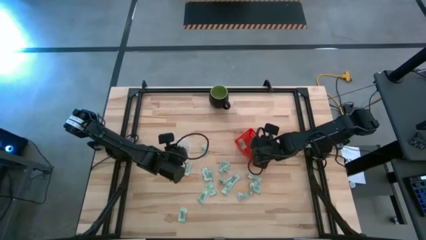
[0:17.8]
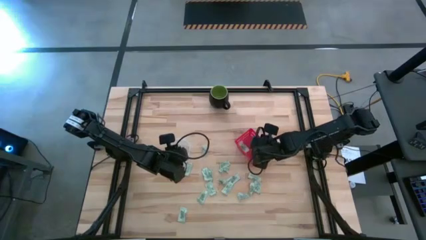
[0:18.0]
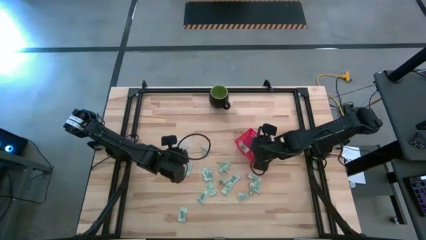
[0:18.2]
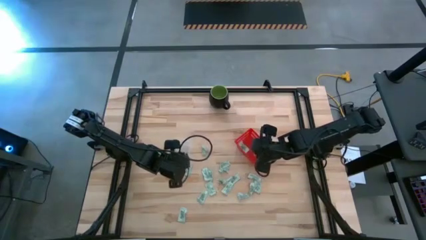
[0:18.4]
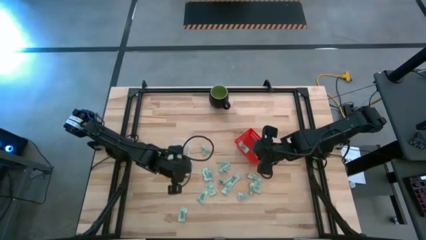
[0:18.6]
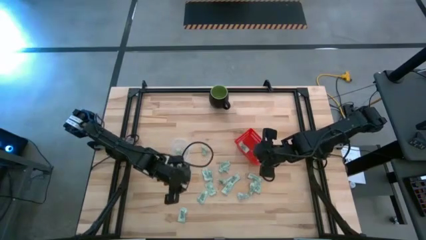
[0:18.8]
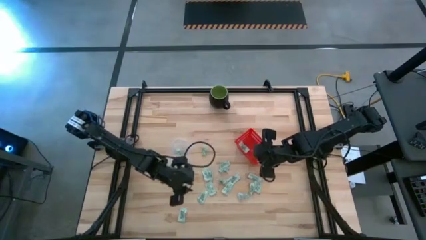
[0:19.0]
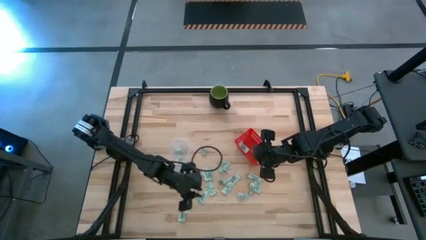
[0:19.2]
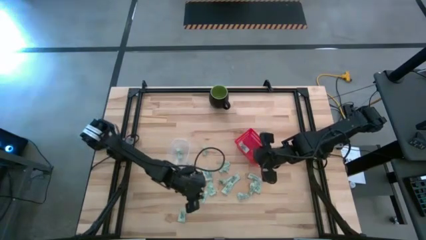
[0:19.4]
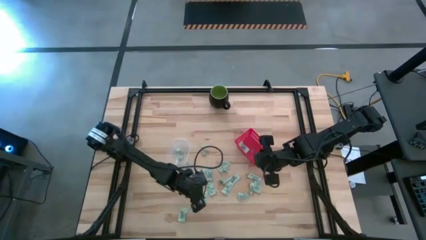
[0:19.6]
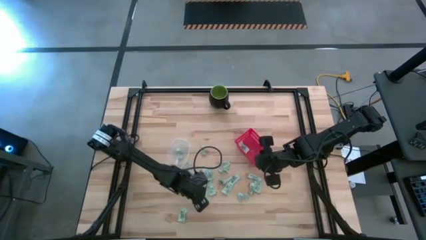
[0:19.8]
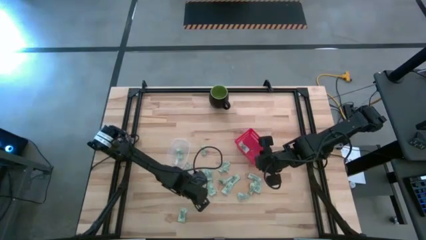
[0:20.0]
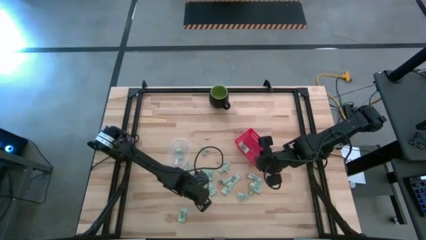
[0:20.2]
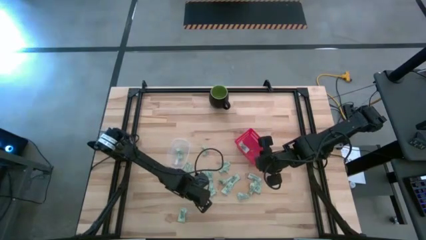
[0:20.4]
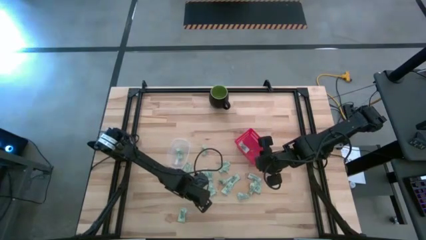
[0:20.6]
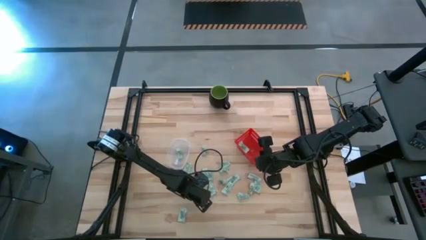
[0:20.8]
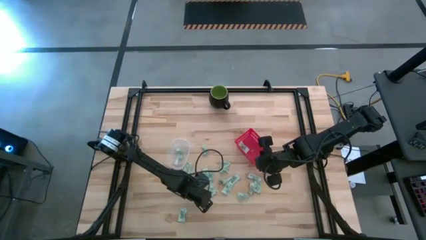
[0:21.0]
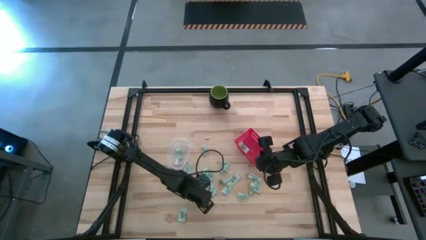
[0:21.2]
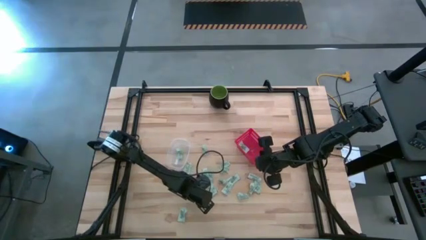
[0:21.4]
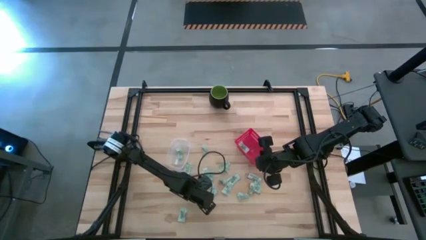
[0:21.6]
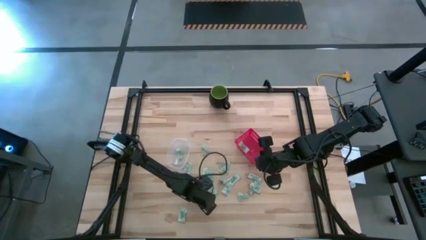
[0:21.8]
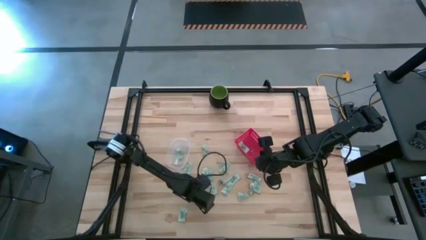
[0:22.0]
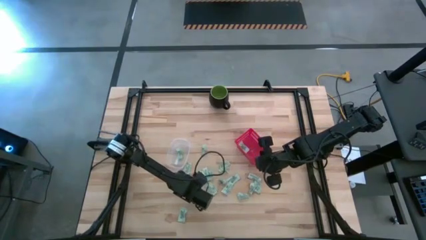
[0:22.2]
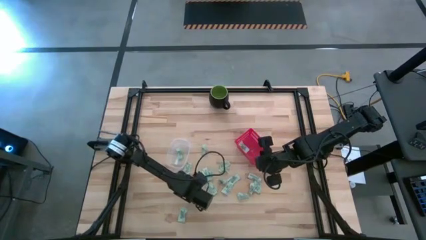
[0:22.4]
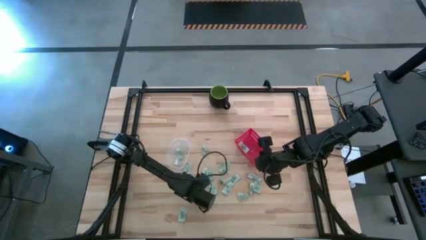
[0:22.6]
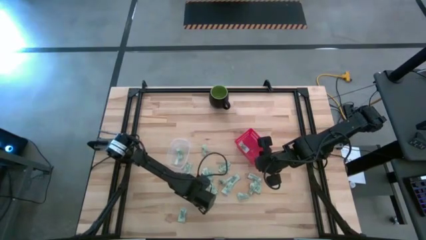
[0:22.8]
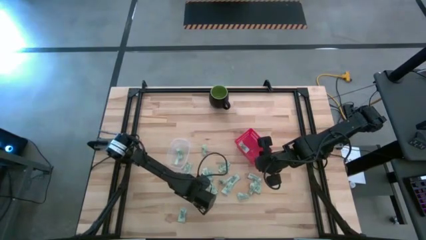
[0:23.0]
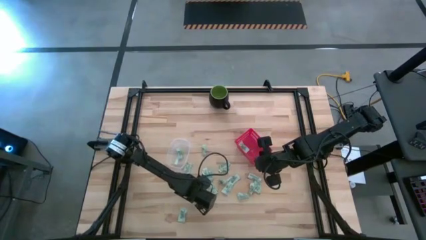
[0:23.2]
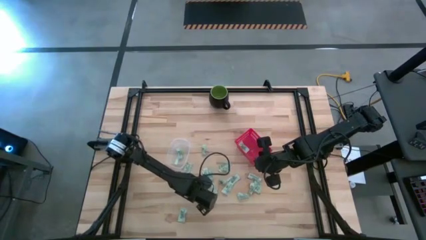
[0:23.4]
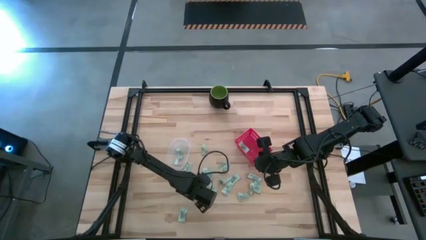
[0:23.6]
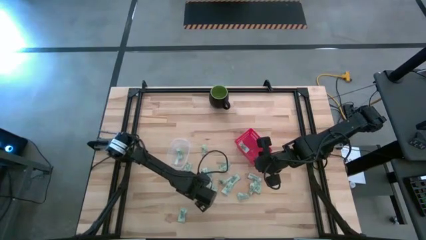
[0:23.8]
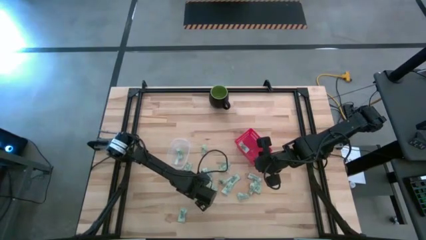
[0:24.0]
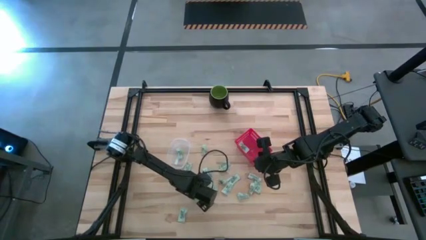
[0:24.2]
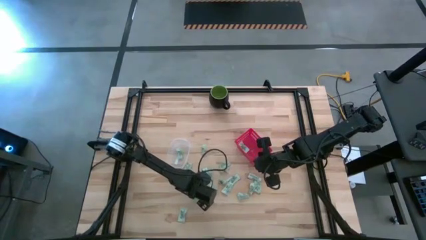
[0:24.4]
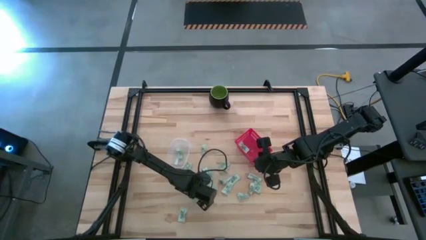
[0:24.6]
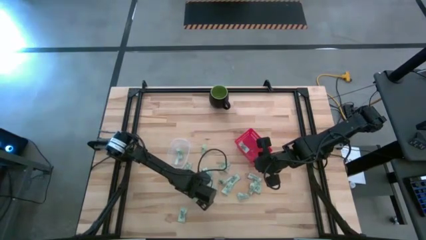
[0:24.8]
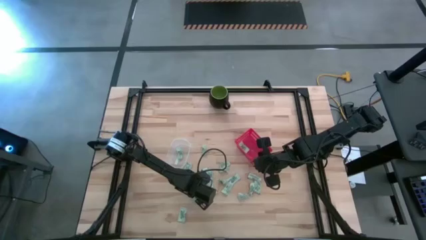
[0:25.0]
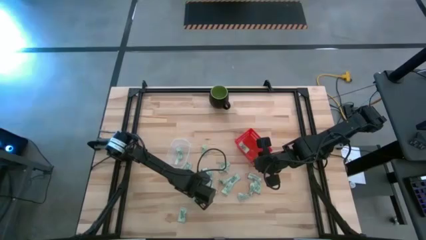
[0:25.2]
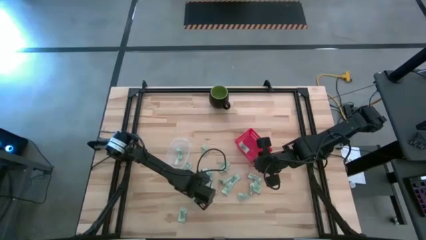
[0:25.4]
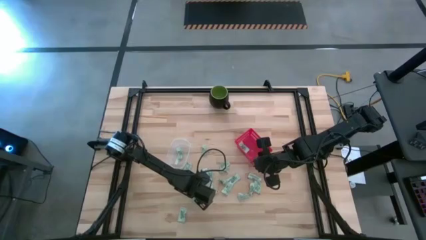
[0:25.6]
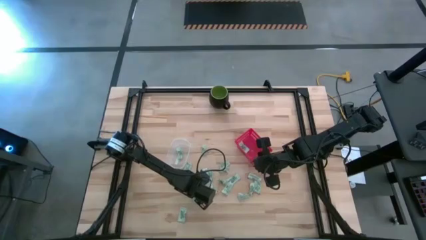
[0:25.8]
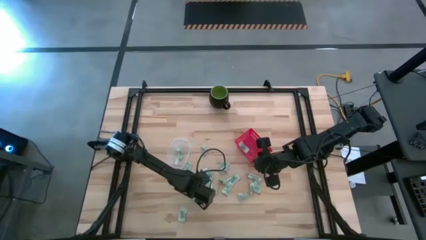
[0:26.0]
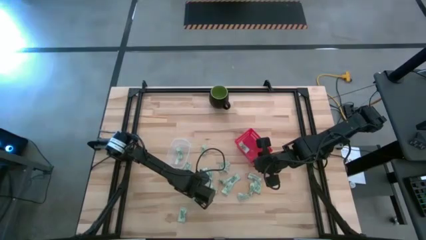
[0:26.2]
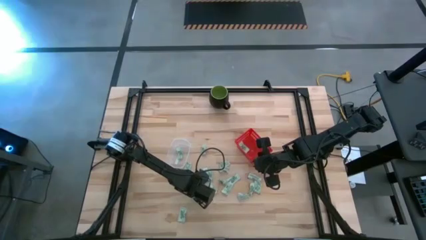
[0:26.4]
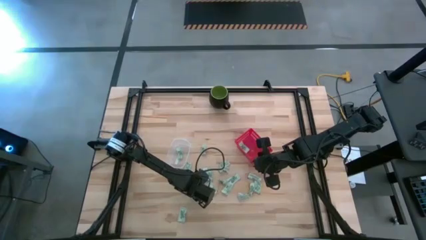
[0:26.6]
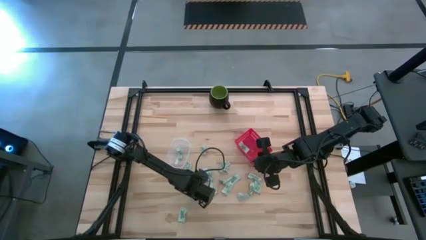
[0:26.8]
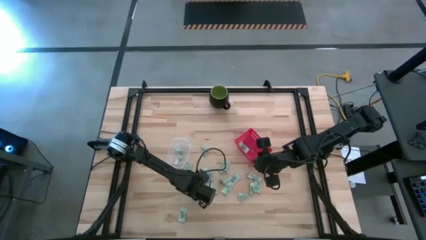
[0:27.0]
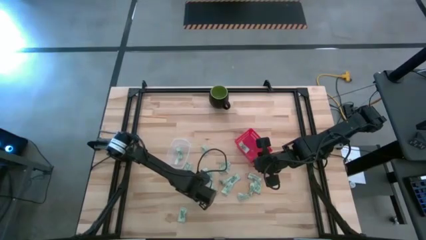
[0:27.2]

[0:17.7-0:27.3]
Task: Pick and place items into bin
Put the stevia packet into the transparent bin

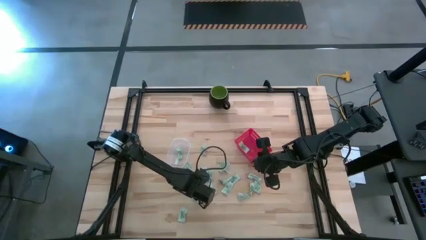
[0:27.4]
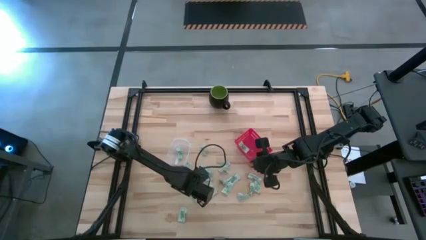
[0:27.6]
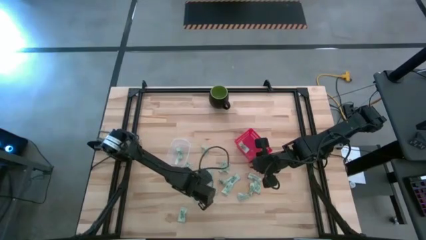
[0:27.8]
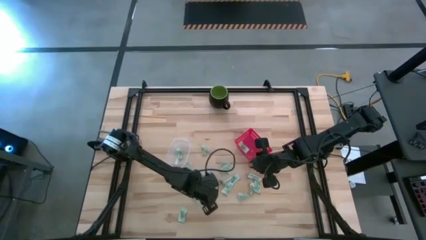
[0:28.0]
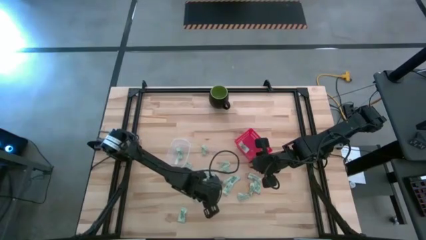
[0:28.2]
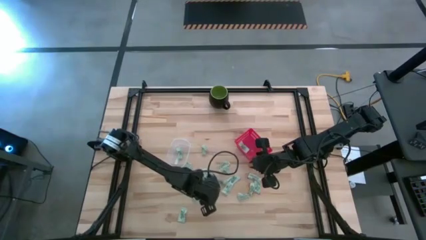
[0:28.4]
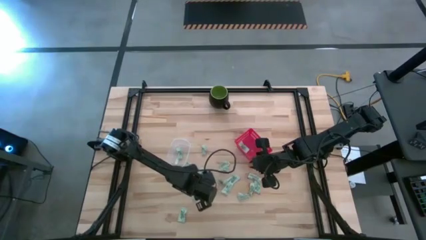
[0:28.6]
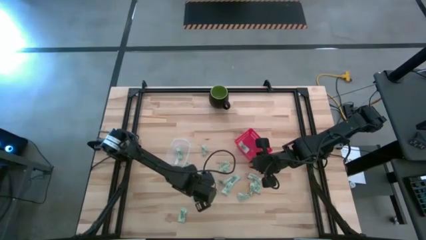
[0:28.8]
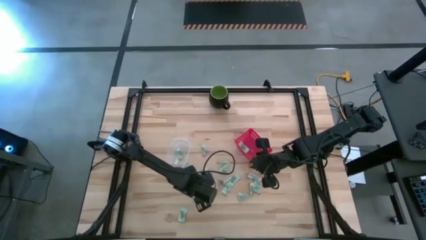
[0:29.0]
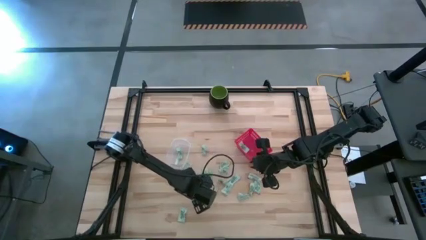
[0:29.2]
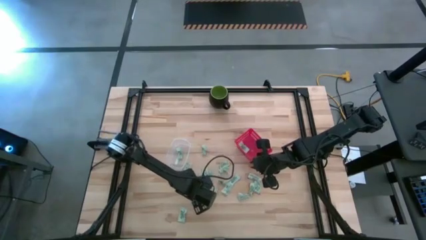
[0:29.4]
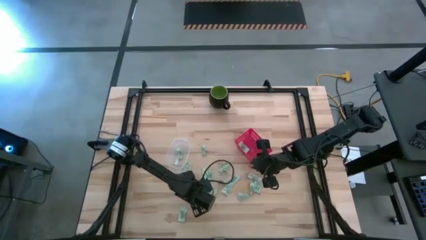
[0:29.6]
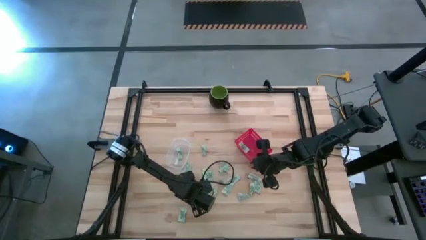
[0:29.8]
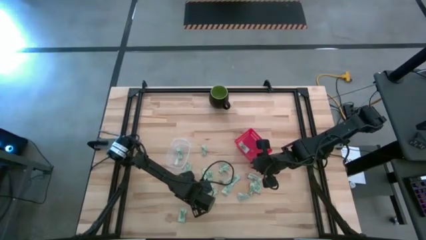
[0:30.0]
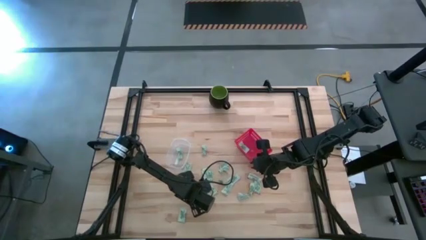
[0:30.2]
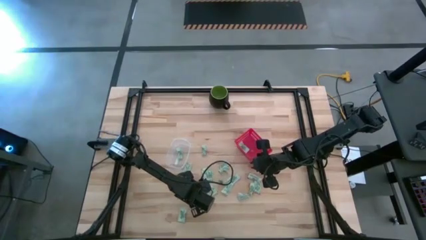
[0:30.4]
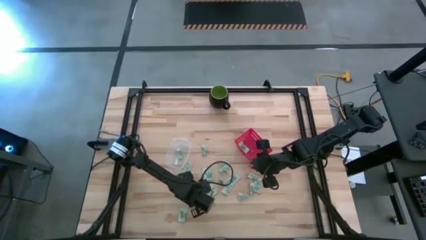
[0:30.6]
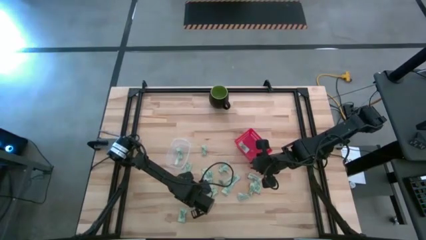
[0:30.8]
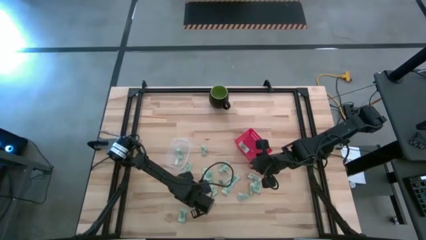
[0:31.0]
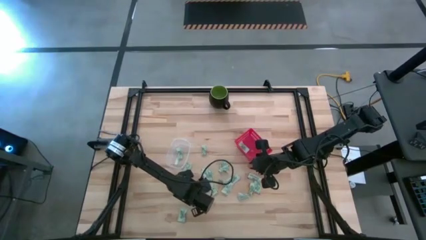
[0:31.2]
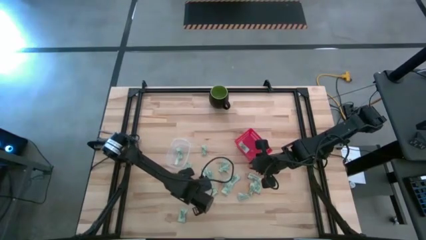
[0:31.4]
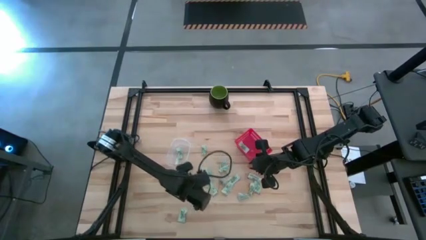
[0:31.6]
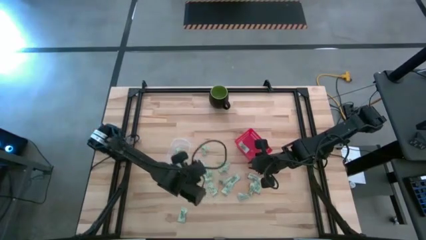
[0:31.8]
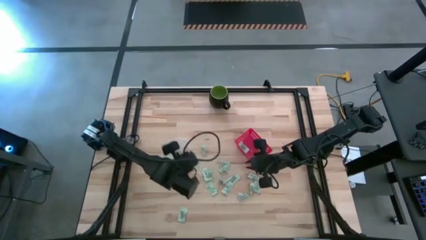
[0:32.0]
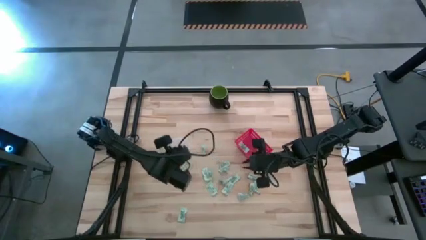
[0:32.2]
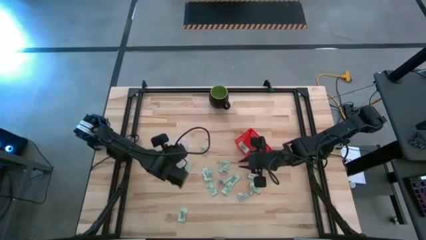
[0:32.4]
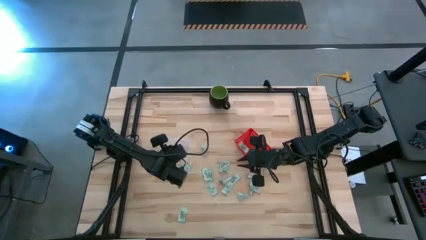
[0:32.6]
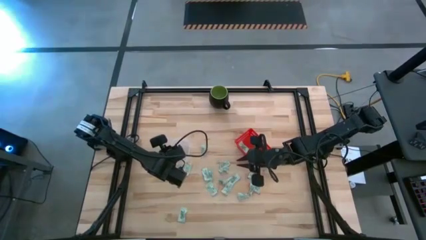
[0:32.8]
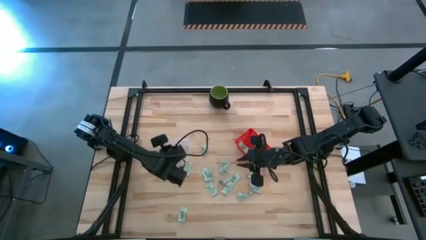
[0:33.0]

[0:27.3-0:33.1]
Put the stevia packet into the transparent bin
